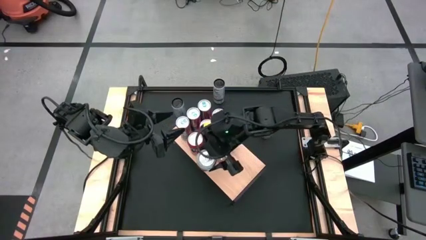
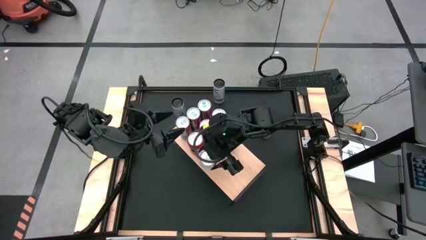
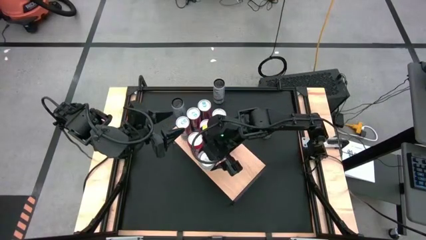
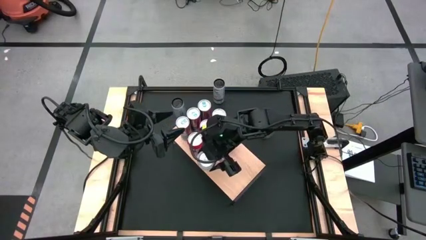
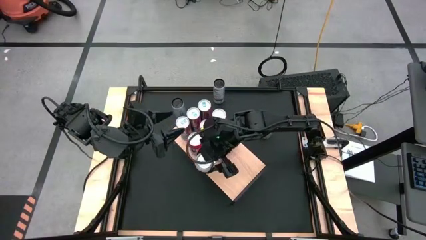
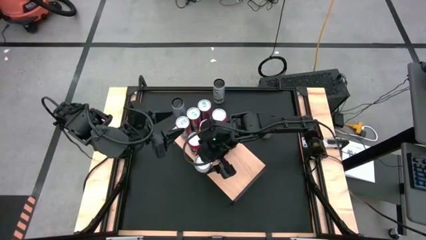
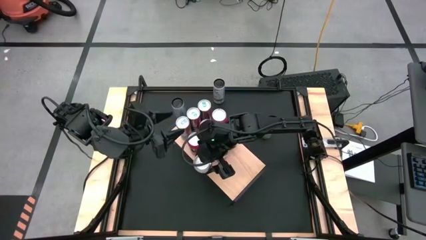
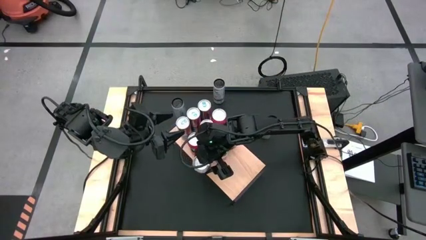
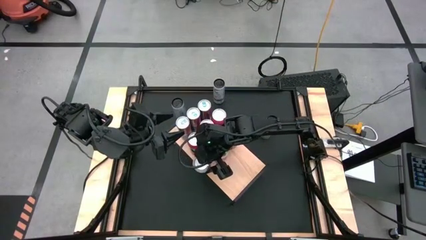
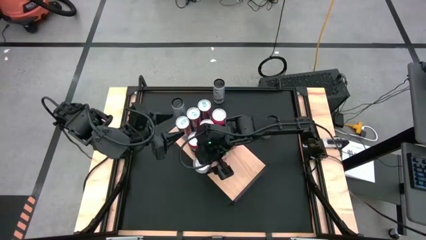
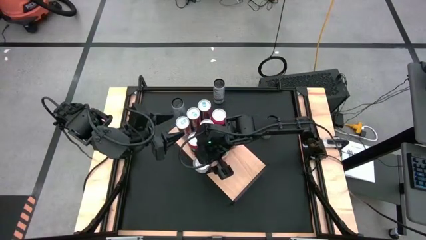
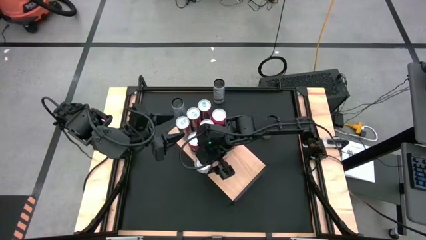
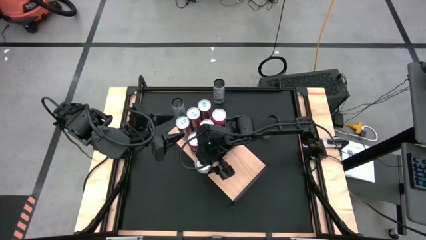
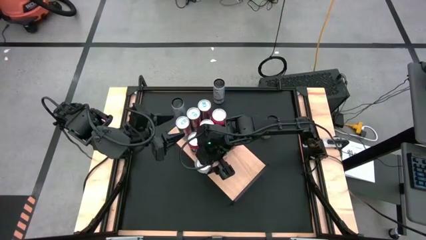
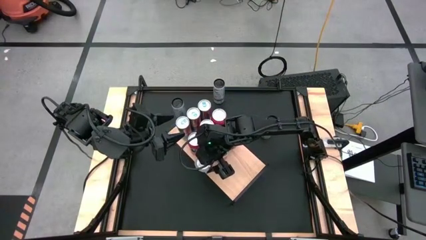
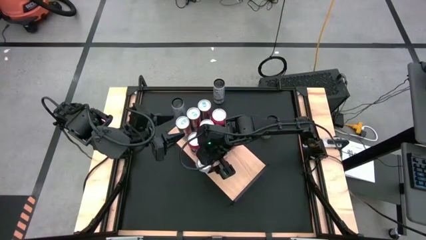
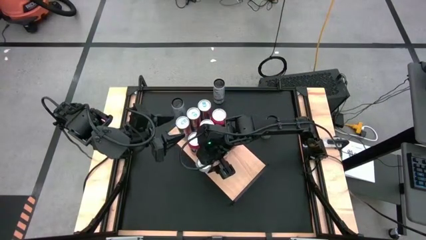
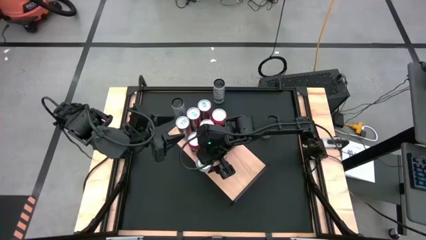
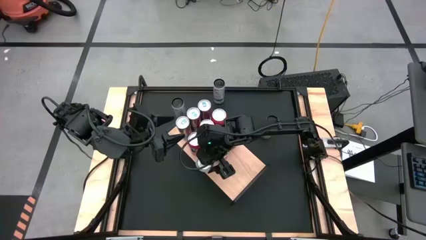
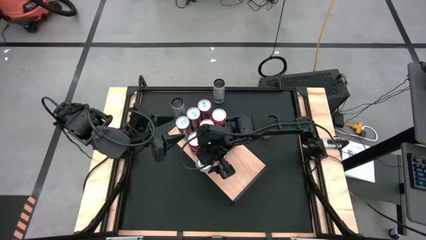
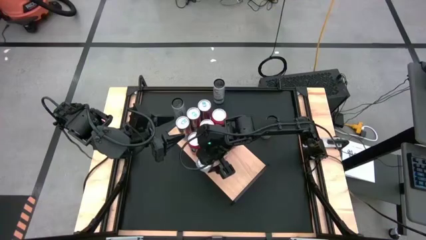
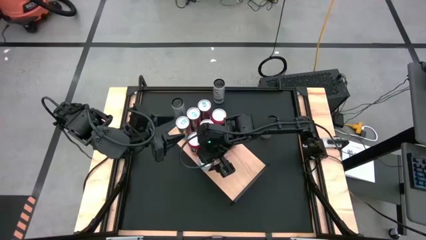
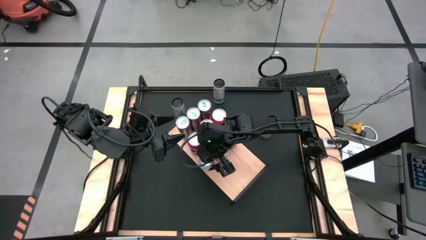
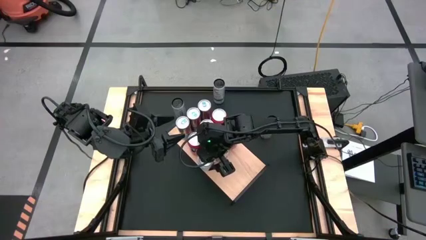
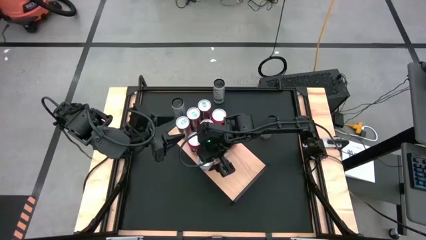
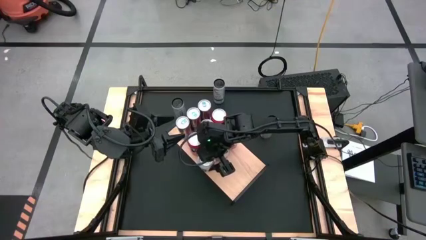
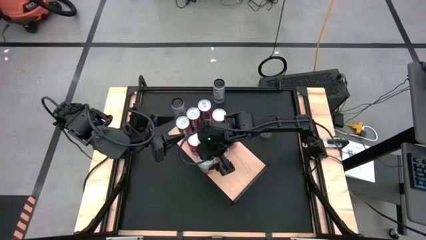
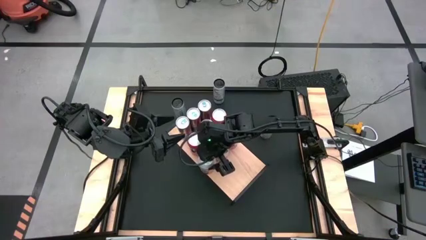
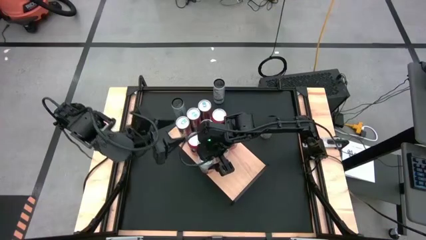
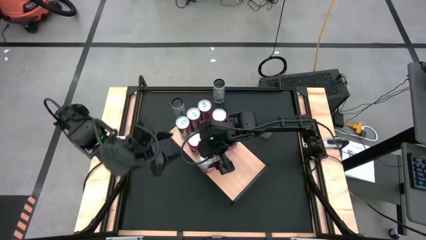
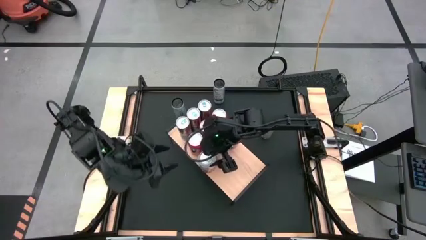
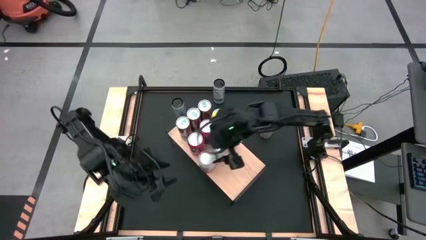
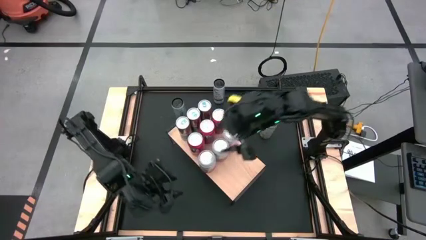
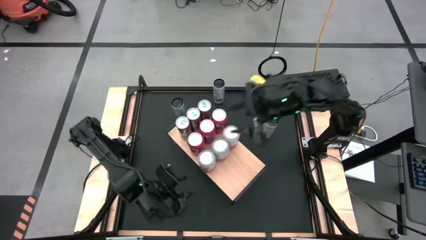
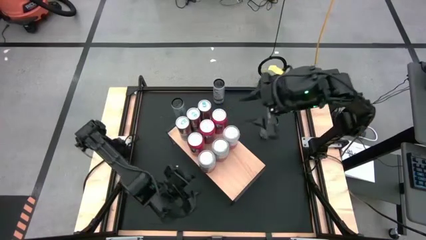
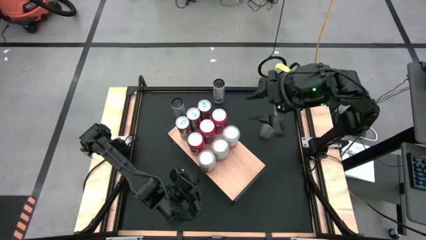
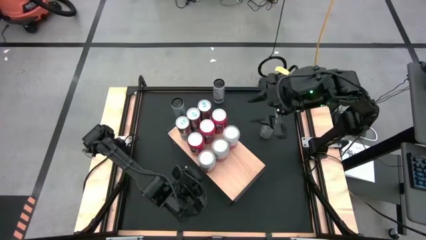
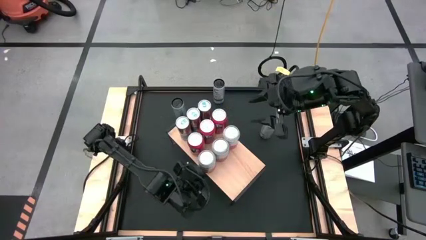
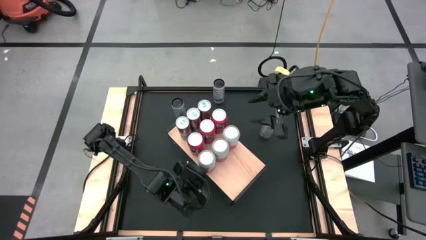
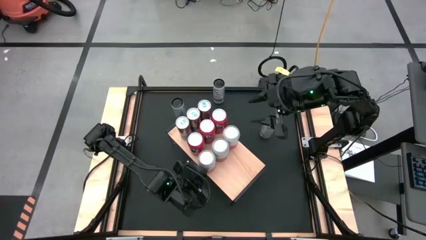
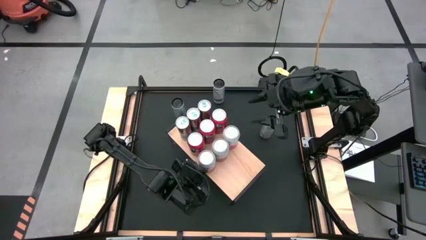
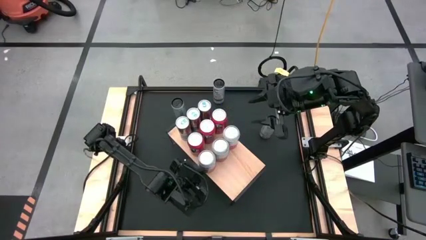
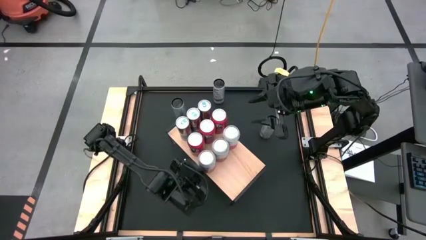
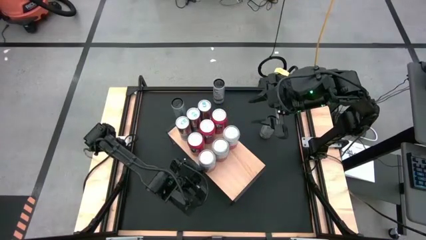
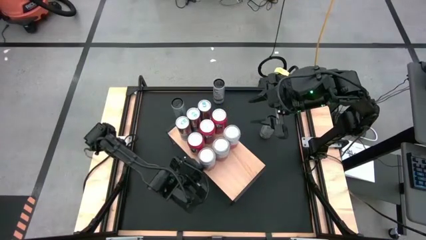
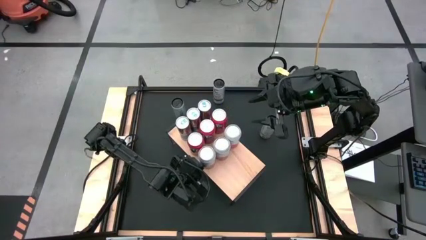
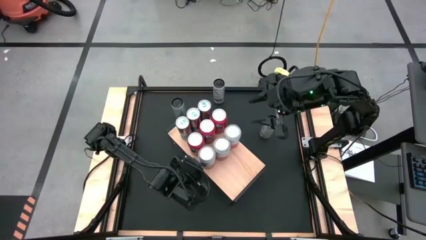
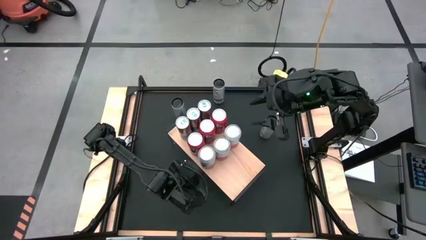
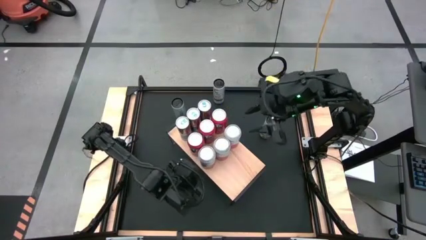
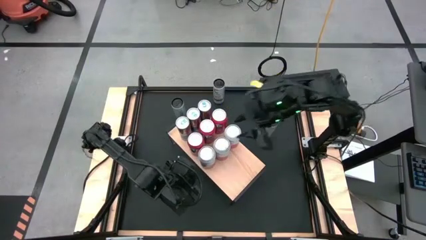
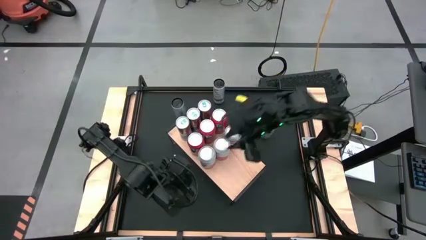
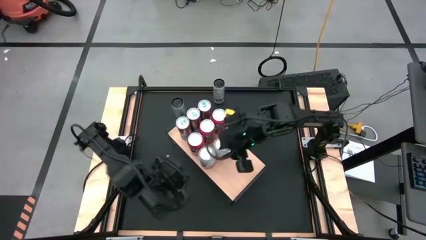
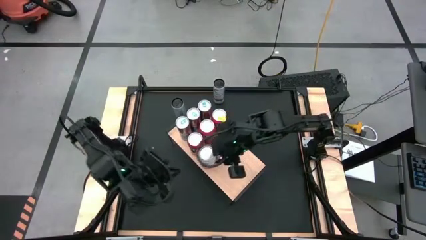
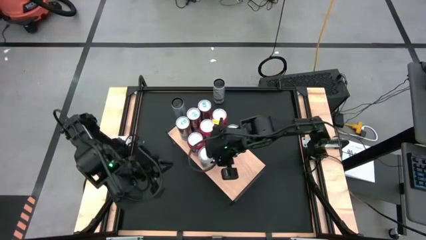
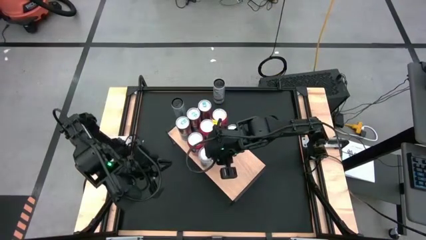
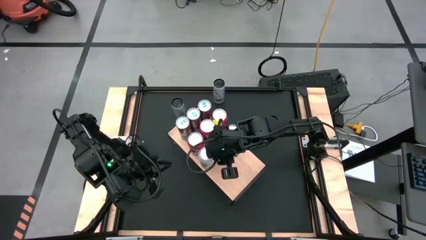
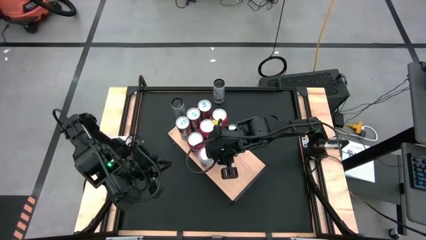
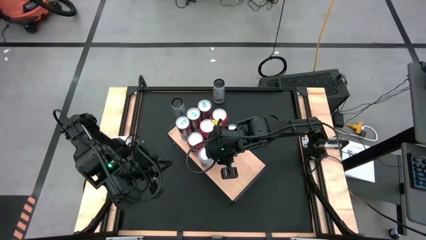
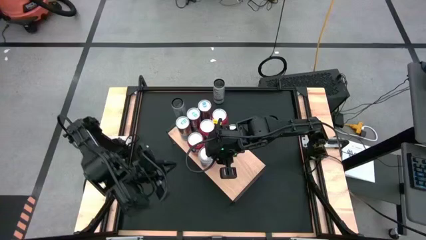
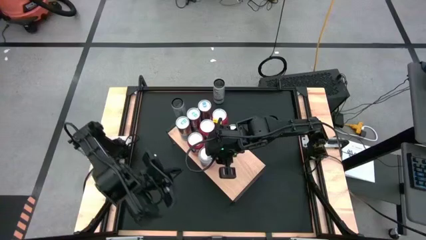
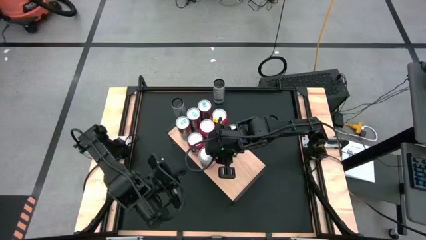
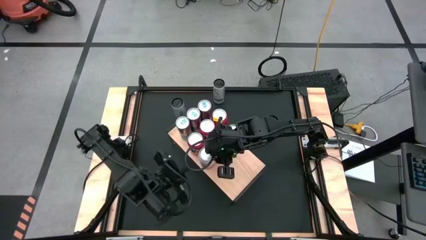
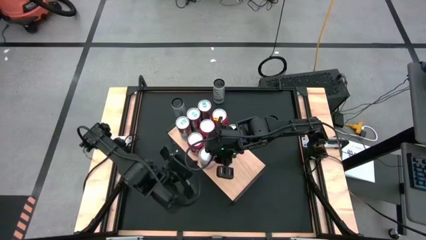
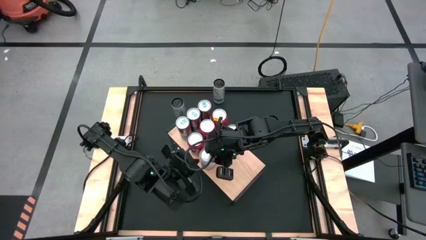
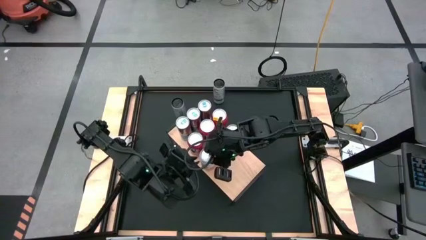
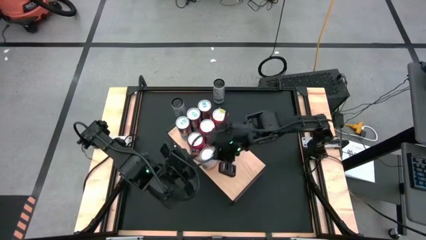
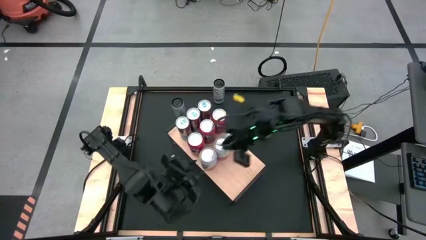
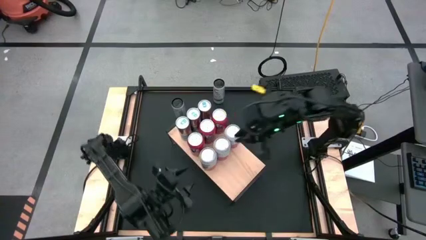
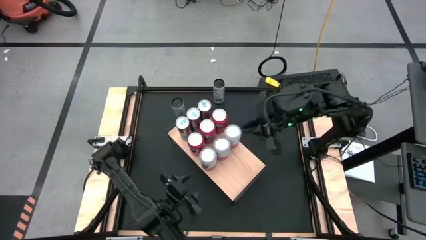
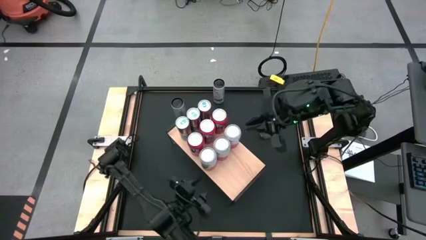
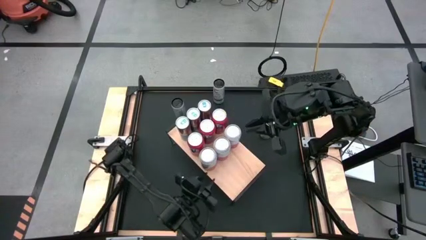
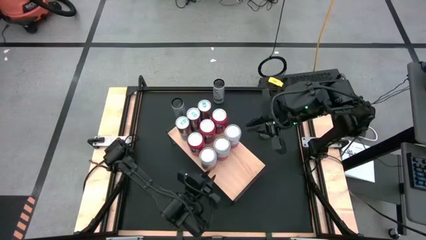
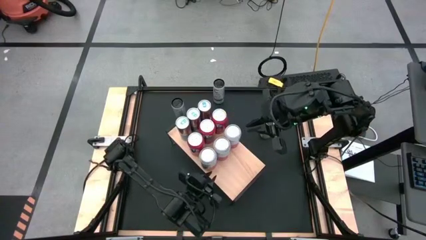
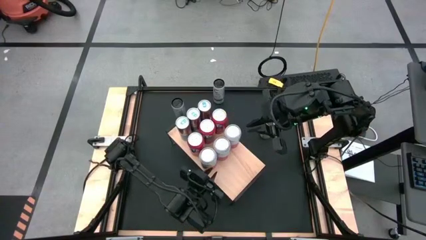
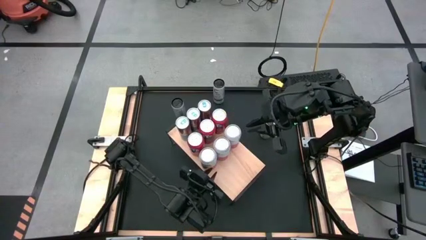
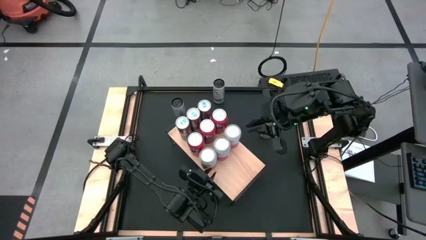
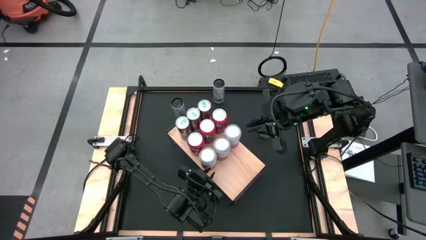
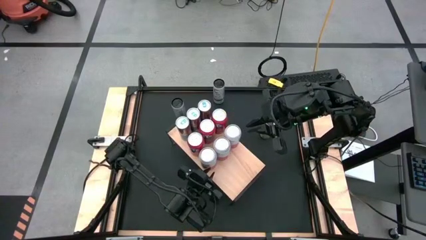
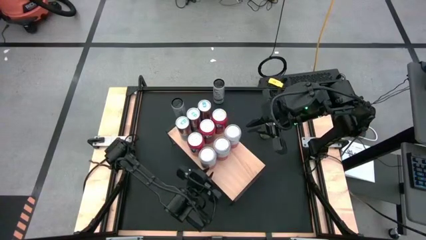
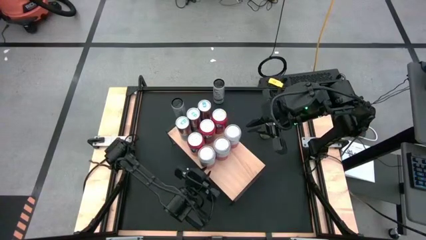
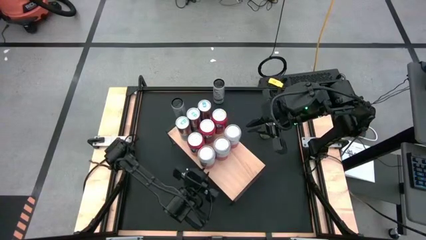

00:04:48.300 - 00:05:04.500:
Task: Place canned beverage on shelf
Put the pink soda can on the shelf aligned with the other pink soda cans
